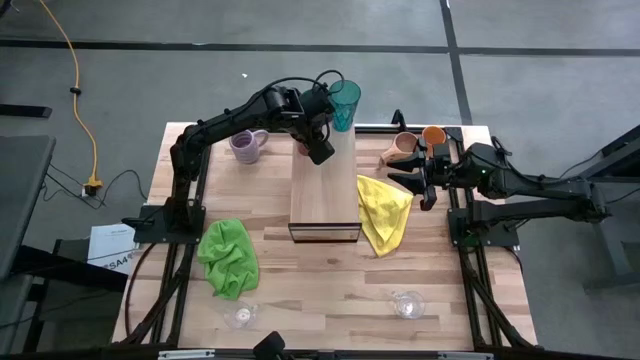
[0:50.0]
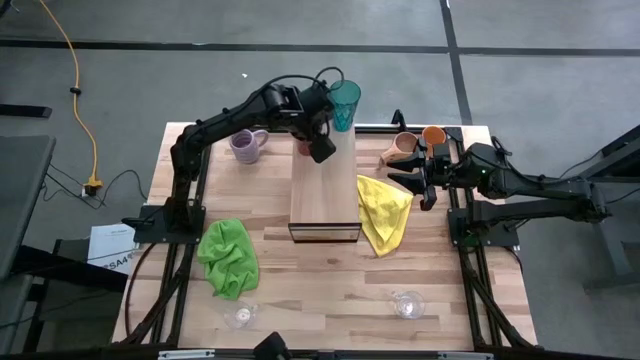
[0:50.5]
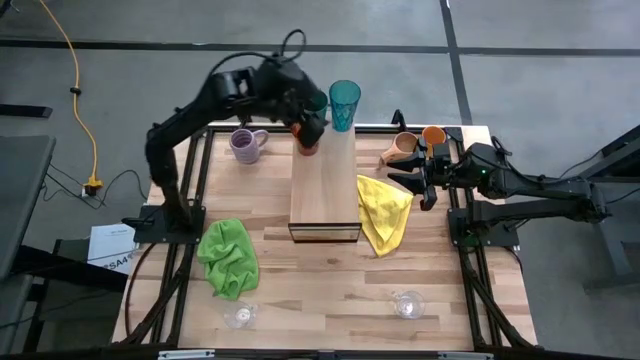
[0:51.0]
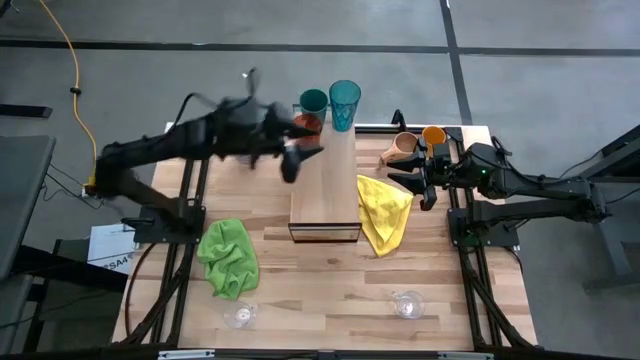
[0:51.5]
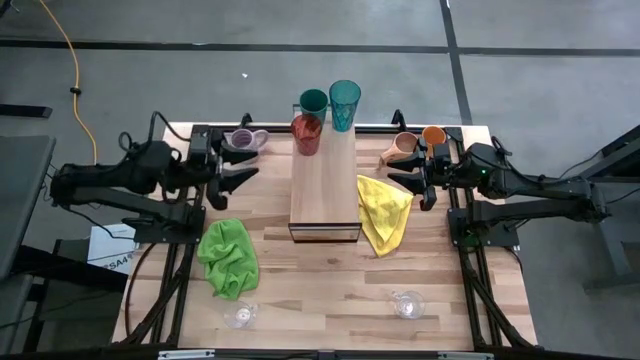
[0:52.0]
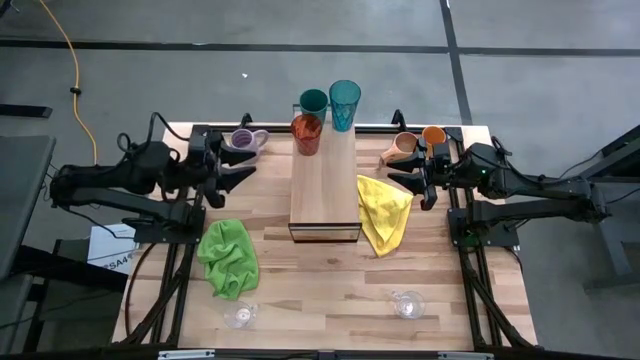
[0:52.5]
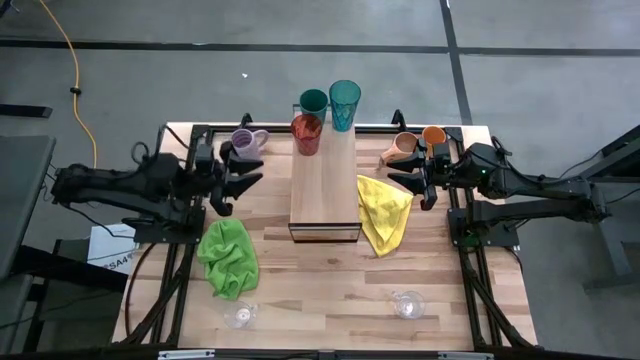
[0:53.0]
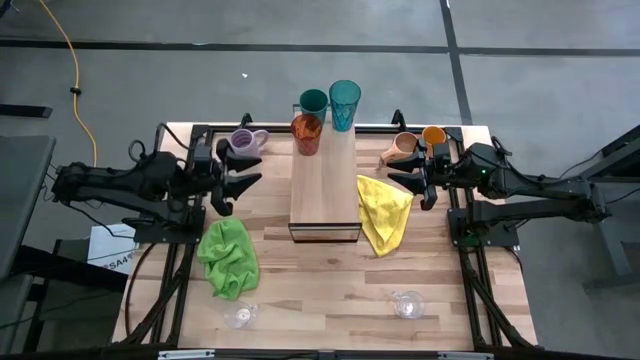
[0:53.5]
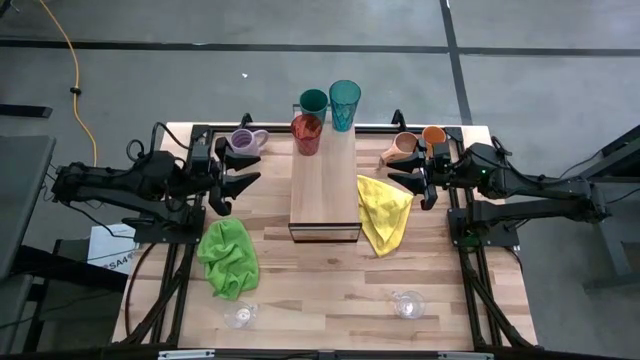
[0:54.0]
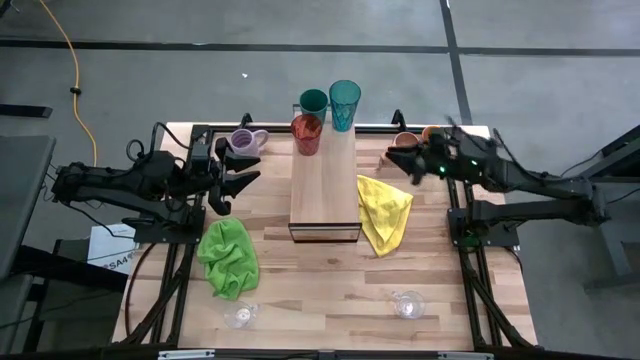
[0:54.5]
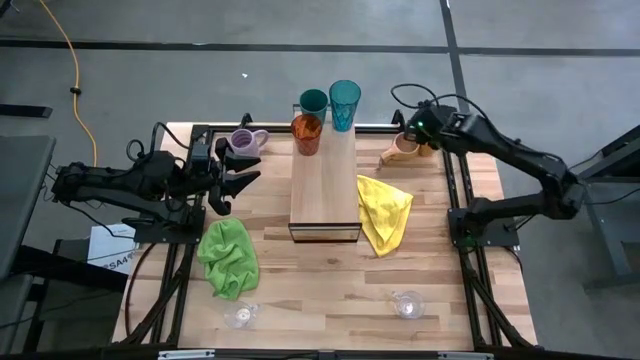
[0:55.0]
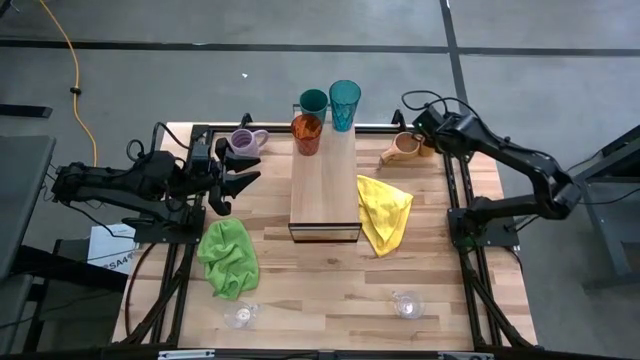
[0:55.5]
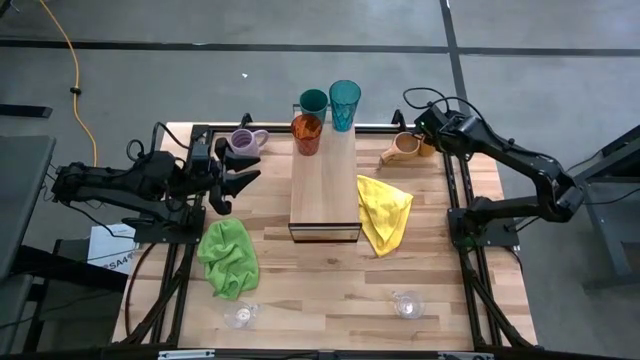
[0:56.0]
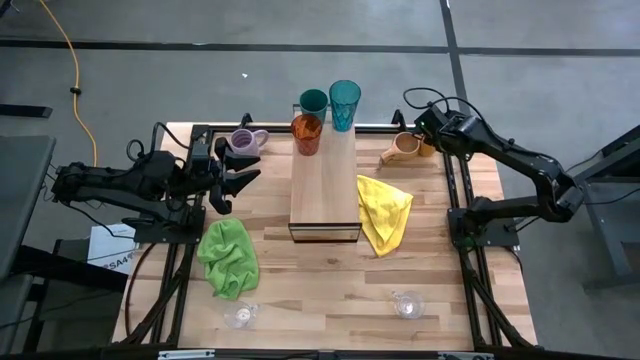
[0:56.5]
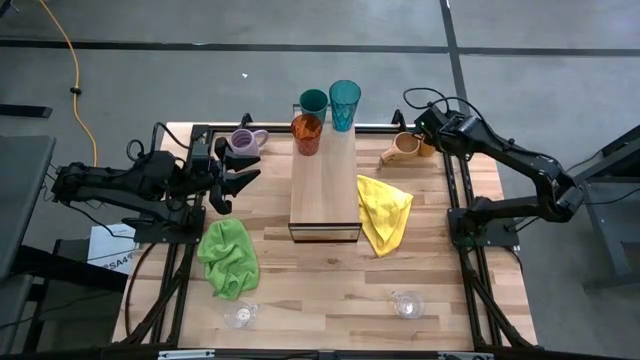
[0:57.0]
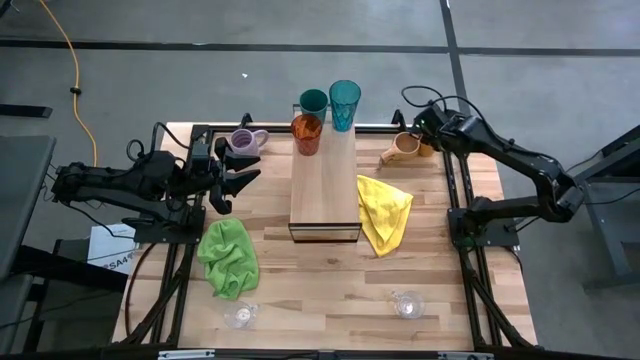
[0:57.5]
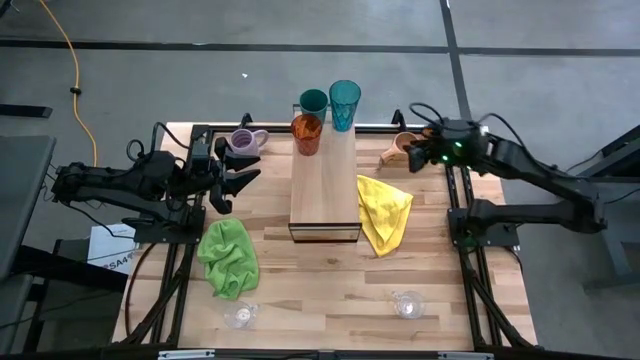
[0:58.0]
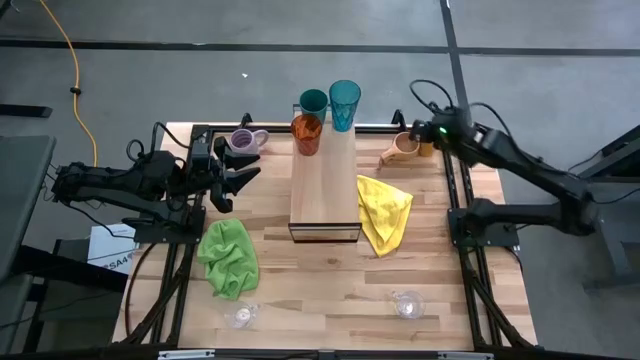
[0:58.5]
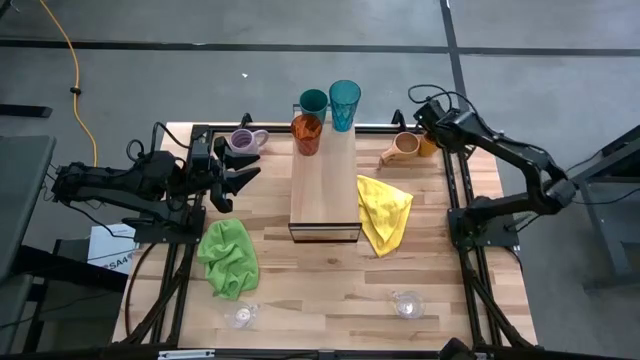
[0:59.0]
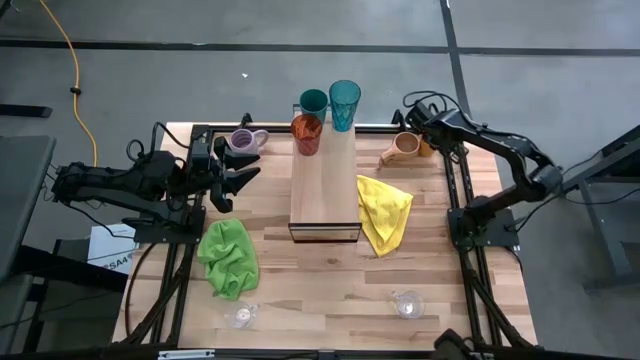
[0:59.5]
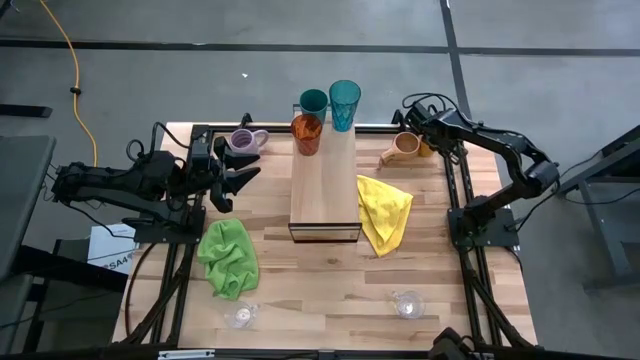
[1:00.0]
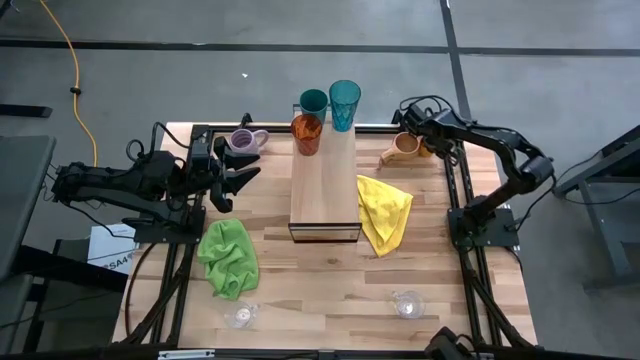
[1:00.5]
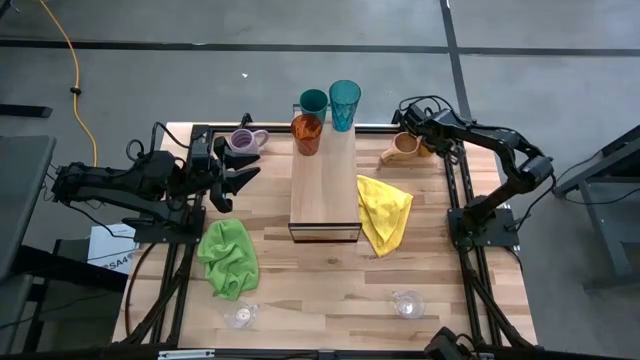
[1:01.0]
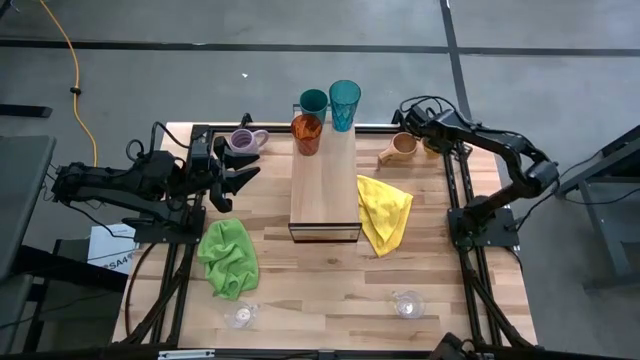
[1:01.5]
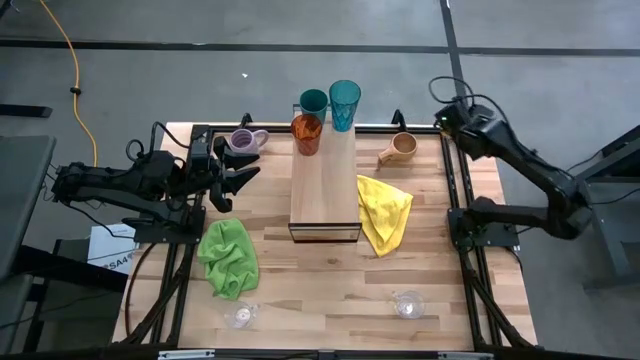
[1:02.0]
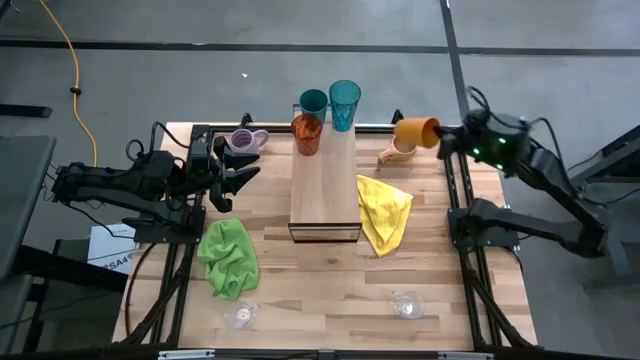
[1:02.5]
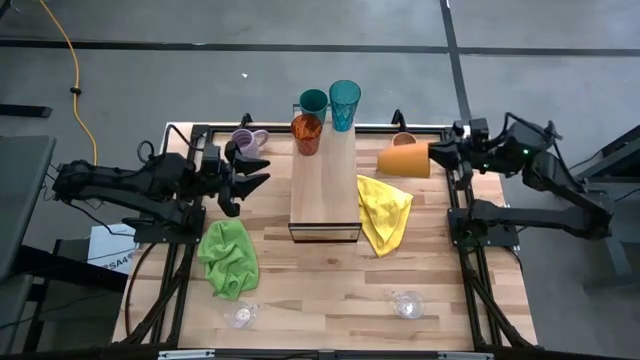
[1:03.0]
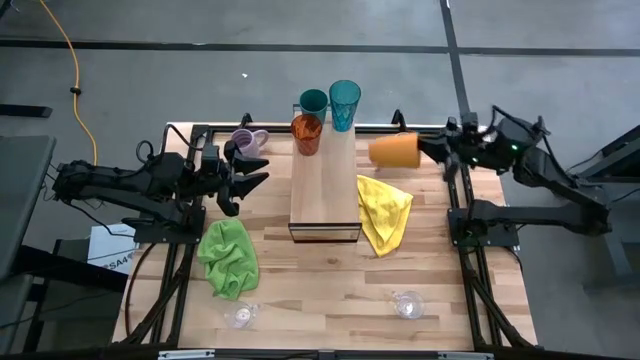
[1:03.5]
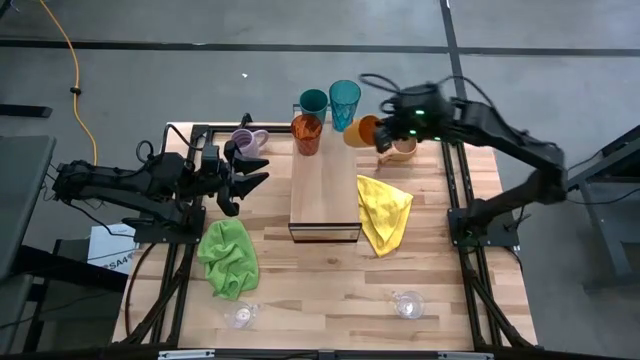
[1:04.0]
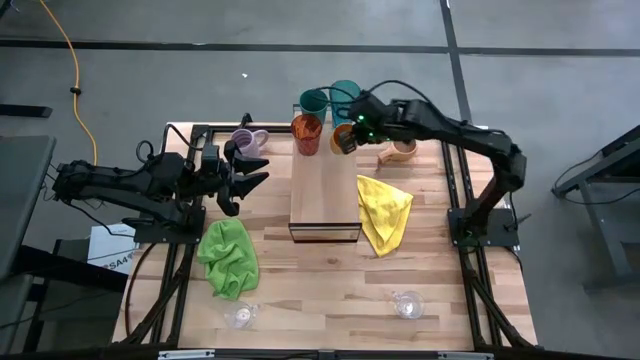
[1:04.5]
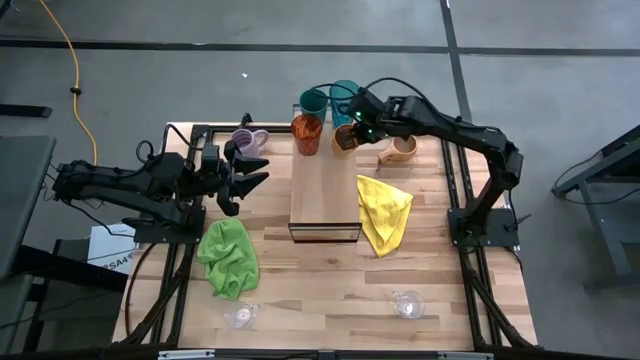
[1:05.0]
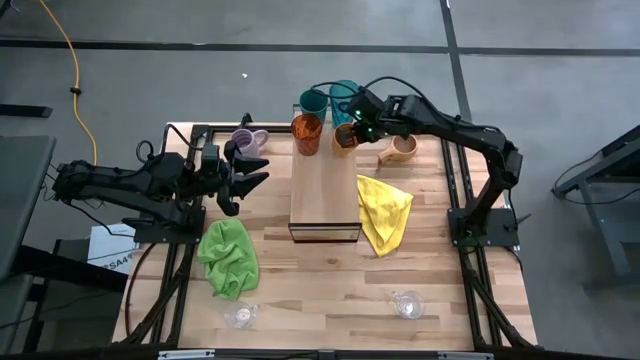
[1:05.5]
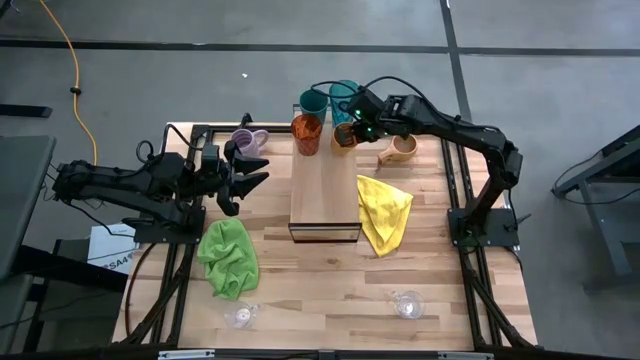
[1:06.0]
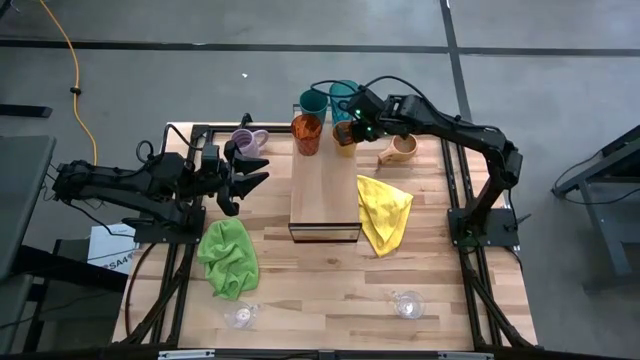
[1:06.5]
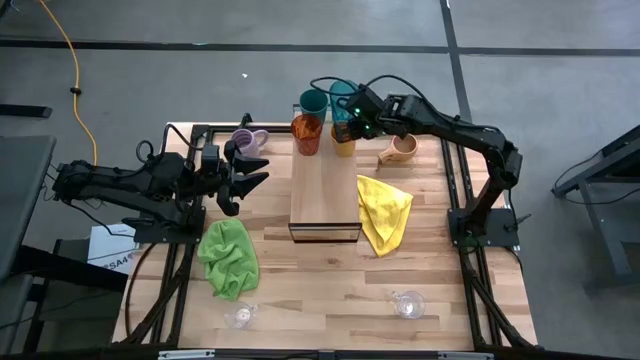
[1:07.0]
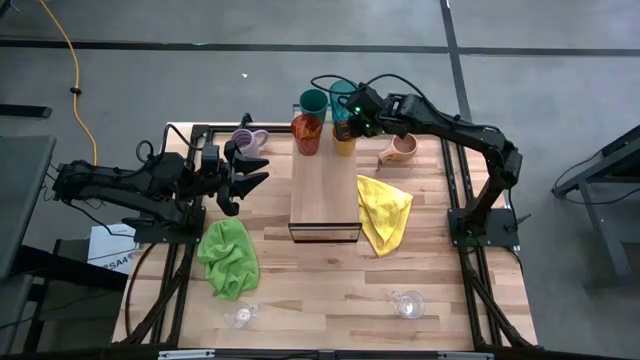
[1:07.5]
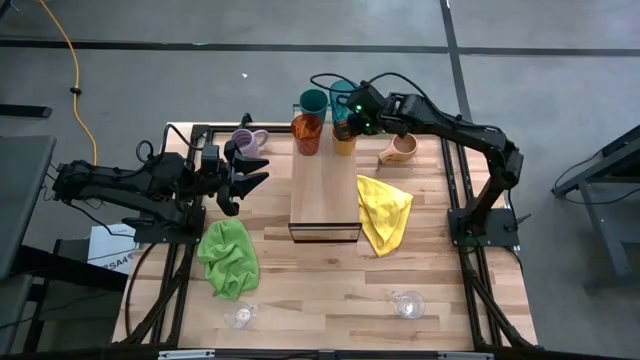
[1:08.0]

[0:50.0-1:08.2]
Task: Stack small to large cups/mugs on shelf
Put the orange plastic cup on the shelf

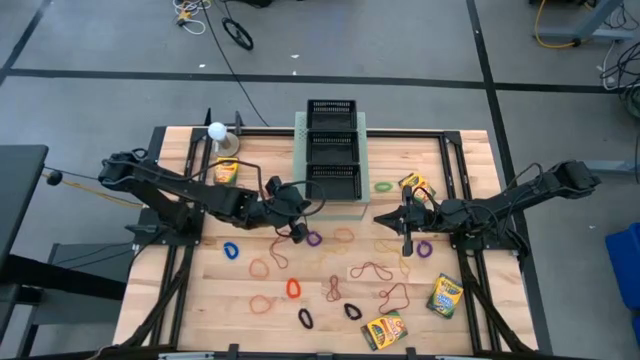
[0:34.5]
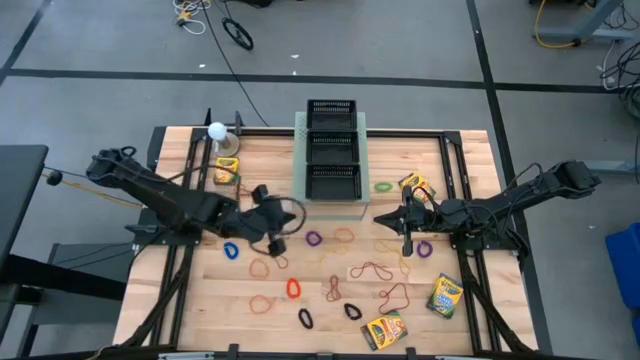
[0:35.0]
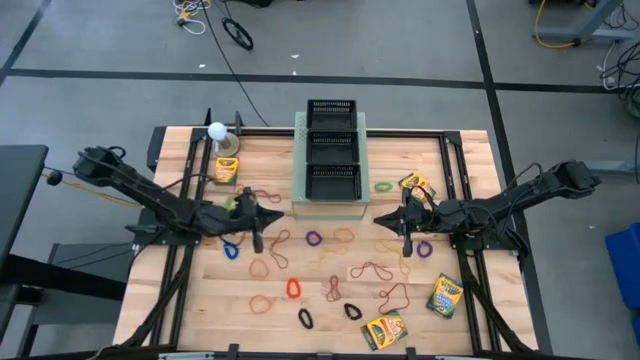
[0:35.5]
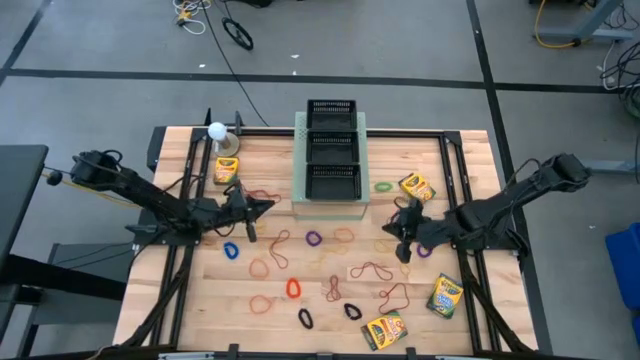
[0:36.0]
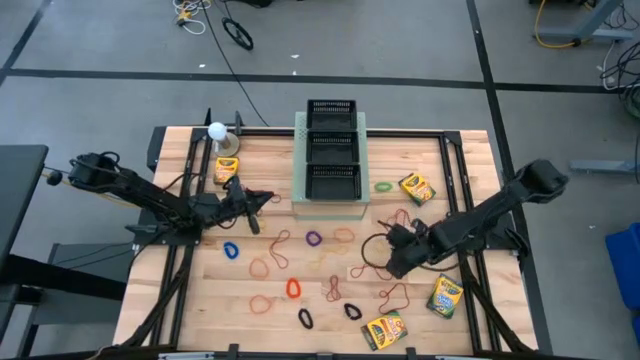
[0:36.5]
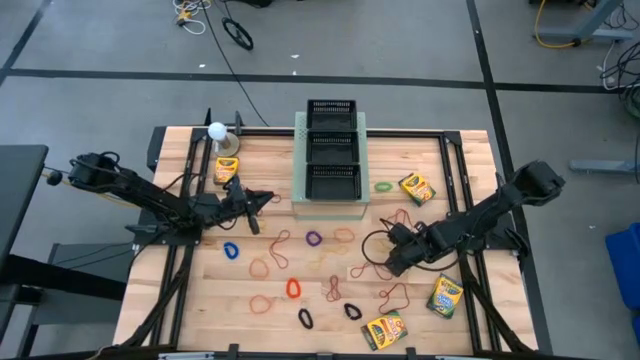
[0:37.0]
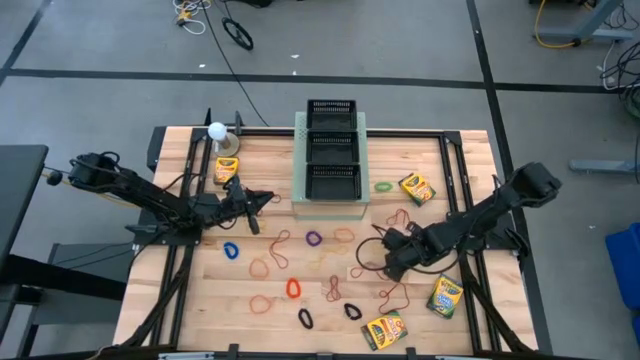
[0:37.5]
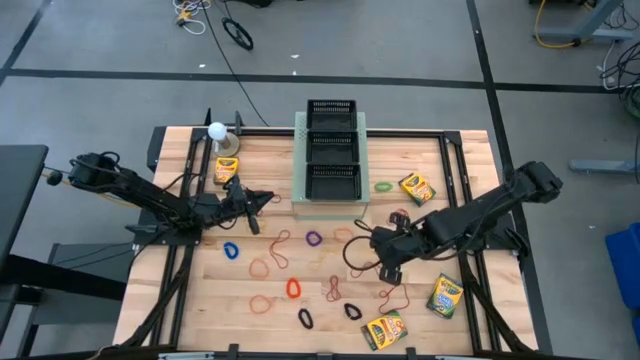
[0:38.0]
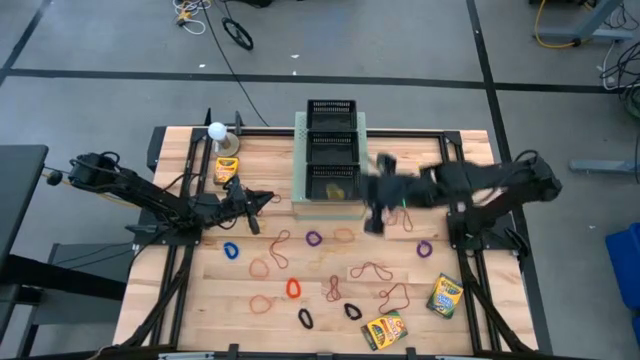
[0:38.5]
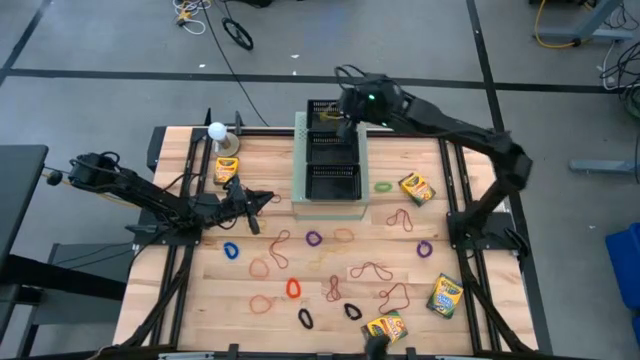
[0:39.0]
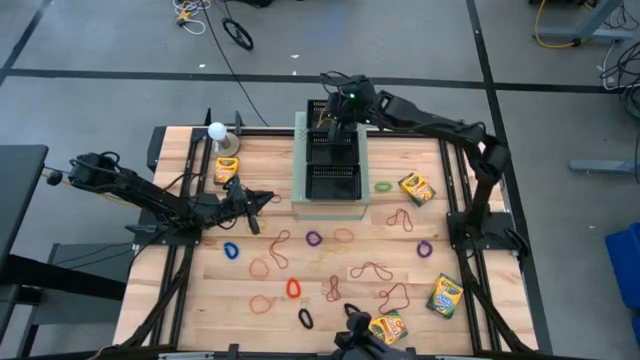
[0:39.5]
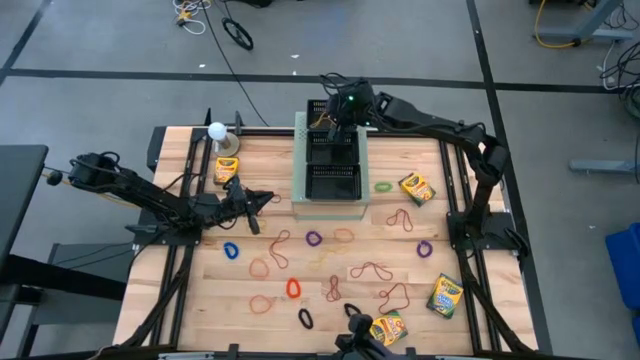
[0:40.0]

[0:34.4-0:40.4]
Task: Pick & Place Office Desk Supplies
Put the yellow rubber band into the top black bin on the shelf
